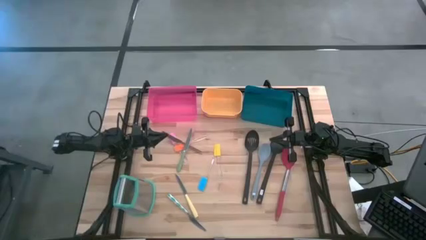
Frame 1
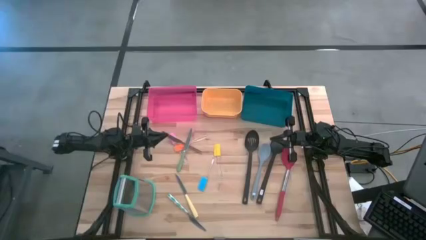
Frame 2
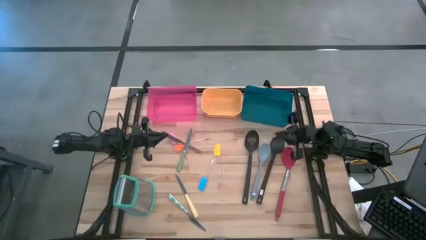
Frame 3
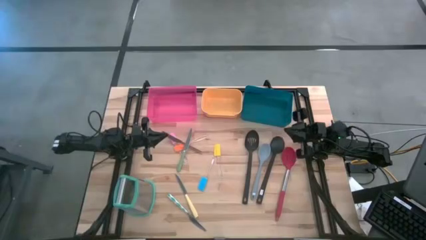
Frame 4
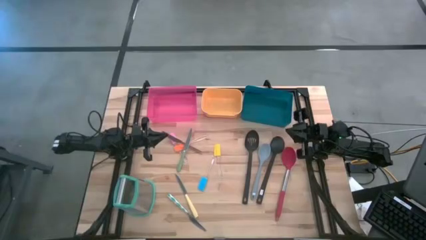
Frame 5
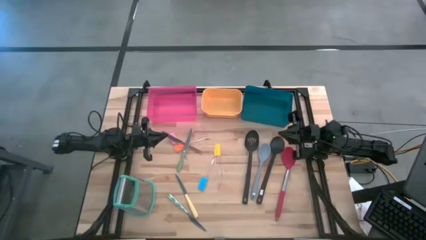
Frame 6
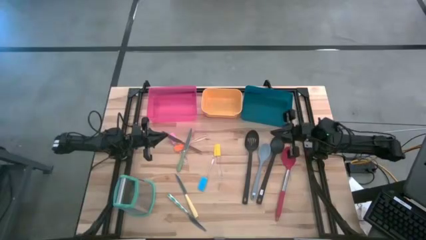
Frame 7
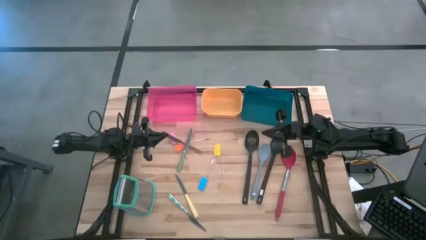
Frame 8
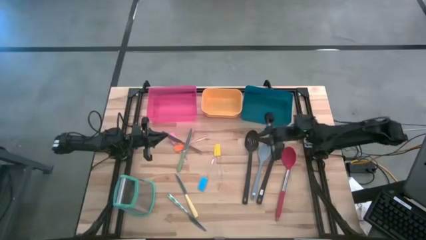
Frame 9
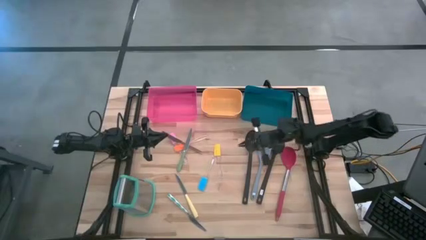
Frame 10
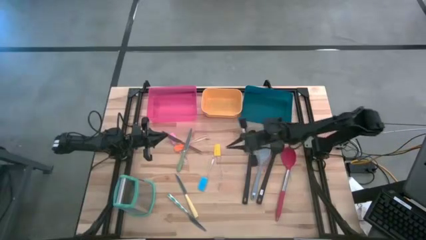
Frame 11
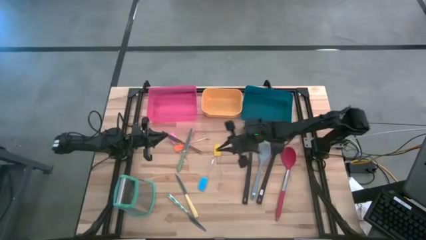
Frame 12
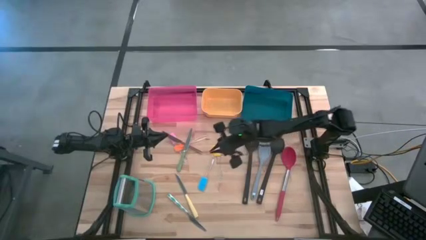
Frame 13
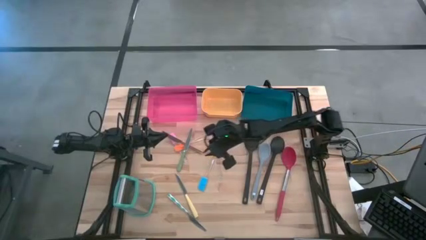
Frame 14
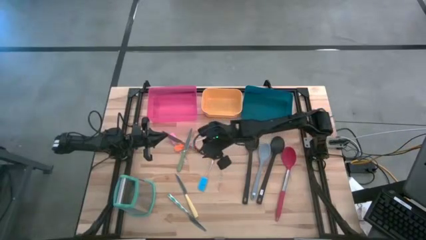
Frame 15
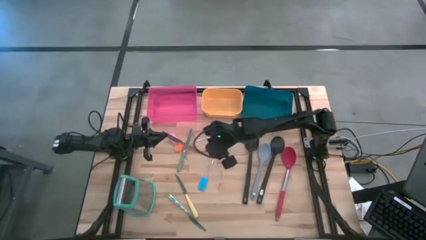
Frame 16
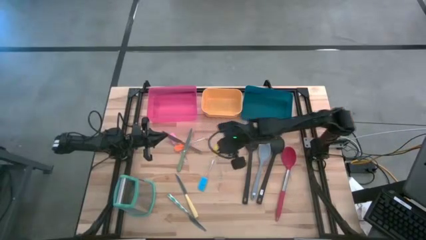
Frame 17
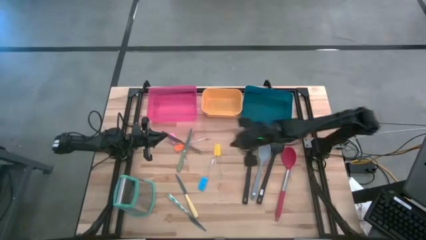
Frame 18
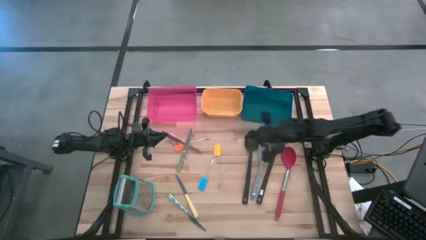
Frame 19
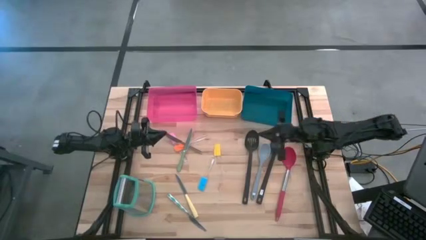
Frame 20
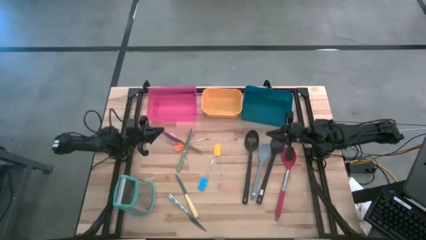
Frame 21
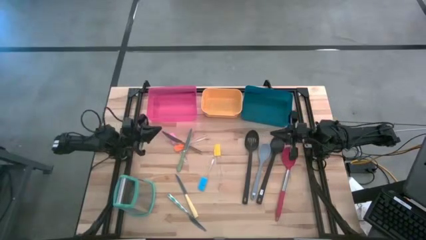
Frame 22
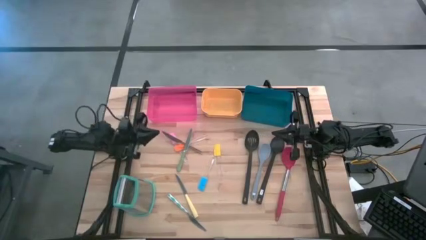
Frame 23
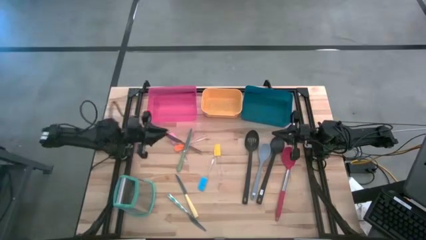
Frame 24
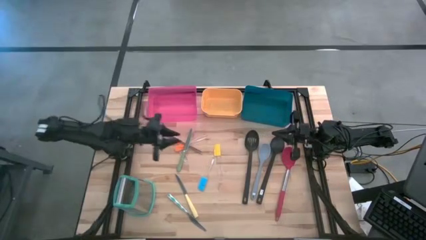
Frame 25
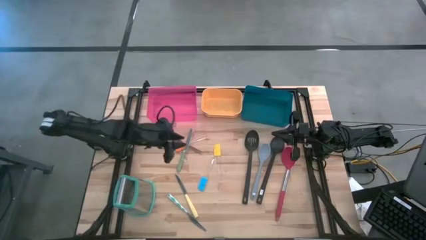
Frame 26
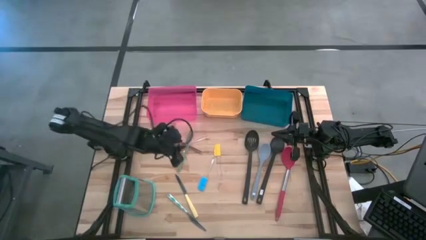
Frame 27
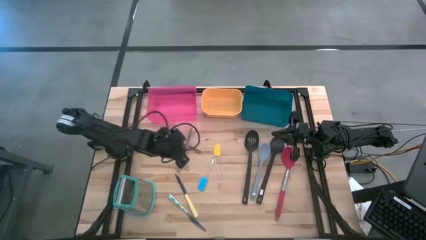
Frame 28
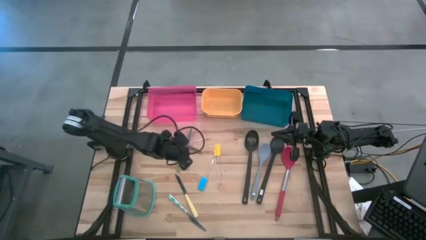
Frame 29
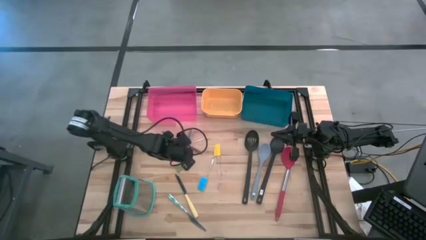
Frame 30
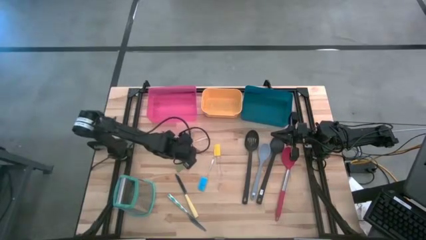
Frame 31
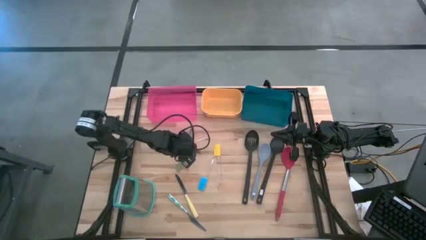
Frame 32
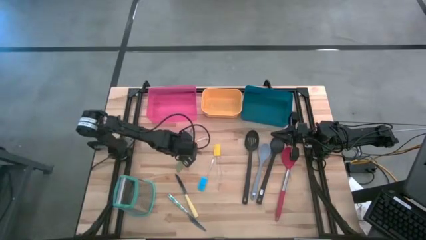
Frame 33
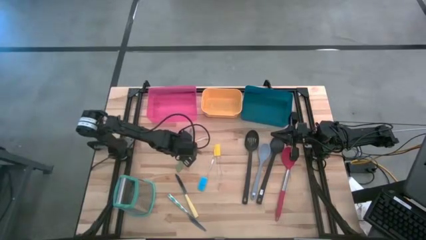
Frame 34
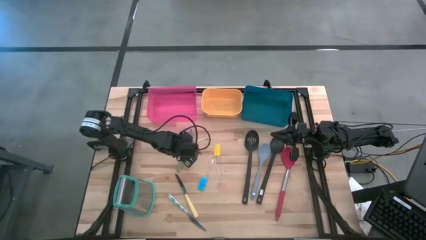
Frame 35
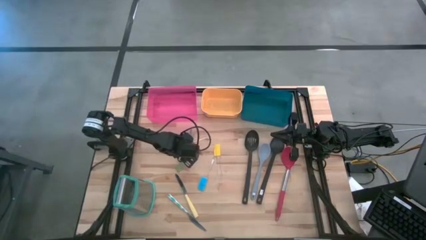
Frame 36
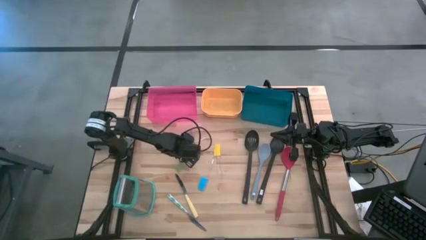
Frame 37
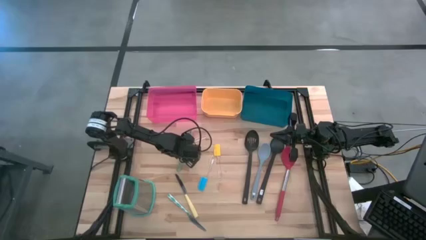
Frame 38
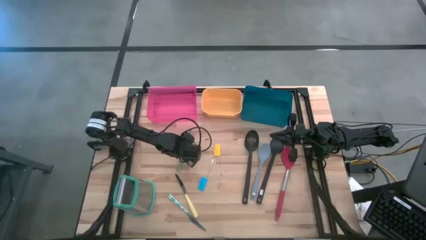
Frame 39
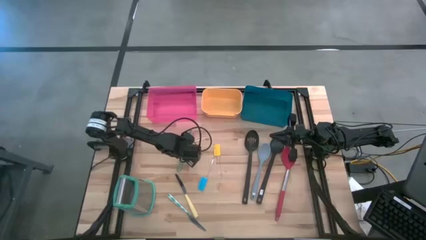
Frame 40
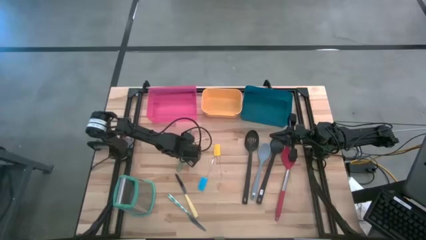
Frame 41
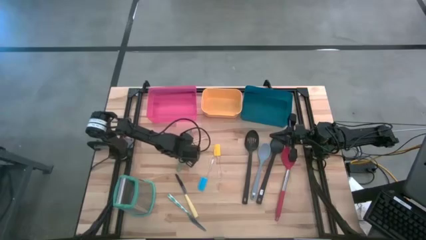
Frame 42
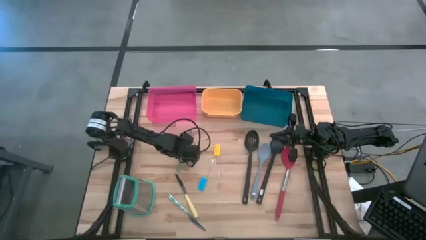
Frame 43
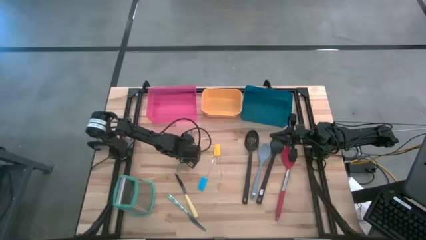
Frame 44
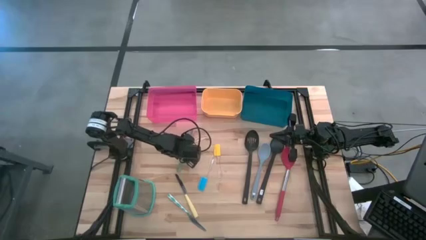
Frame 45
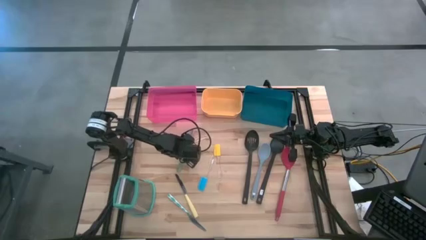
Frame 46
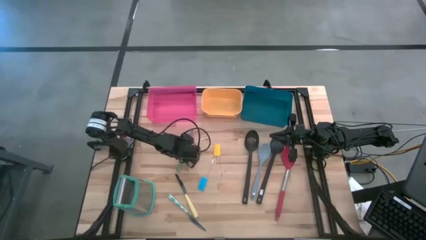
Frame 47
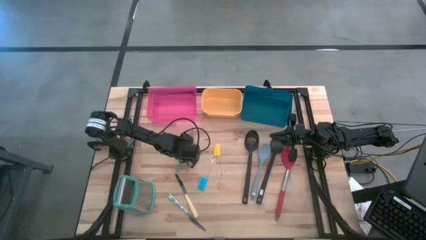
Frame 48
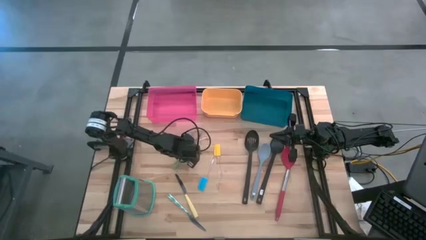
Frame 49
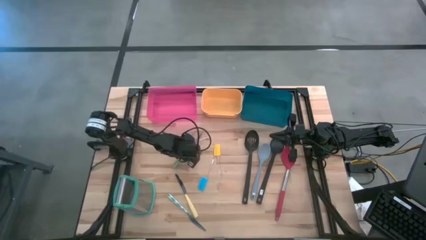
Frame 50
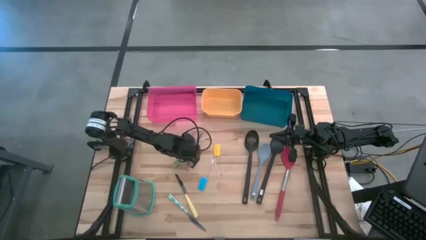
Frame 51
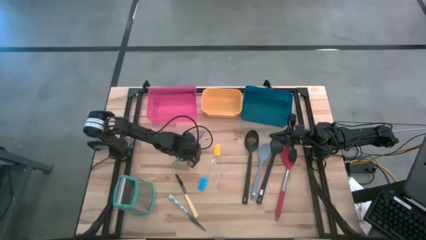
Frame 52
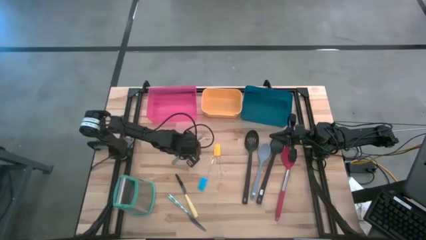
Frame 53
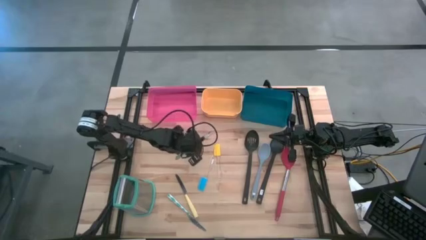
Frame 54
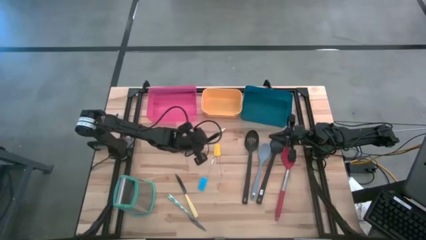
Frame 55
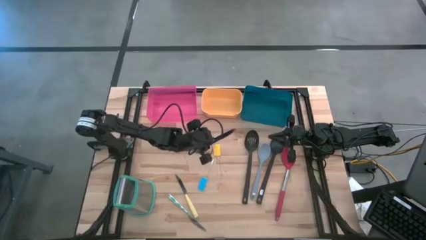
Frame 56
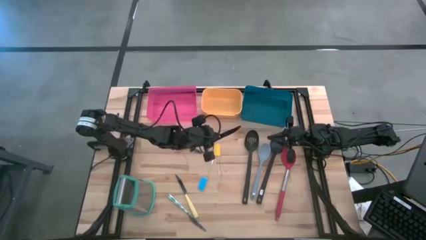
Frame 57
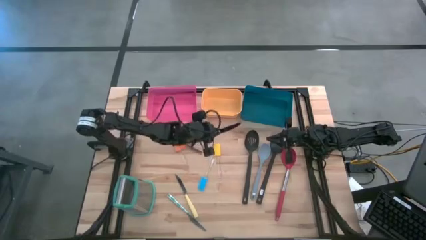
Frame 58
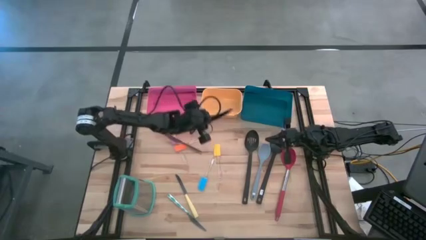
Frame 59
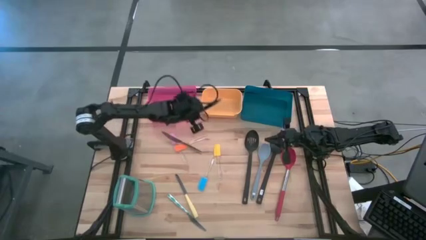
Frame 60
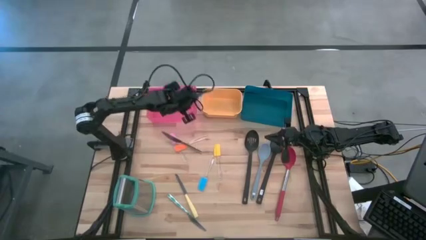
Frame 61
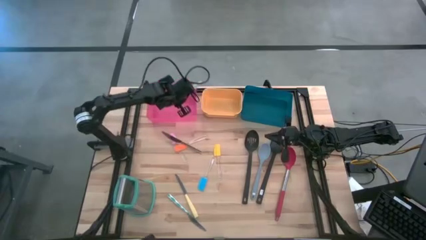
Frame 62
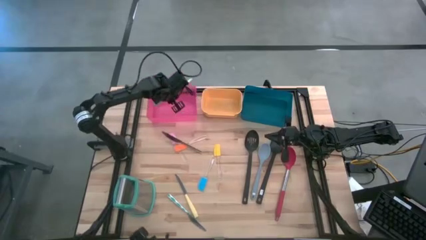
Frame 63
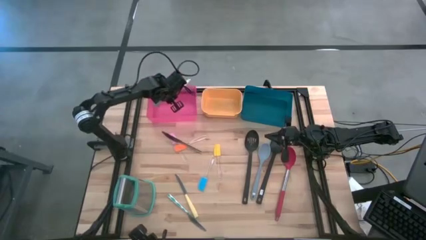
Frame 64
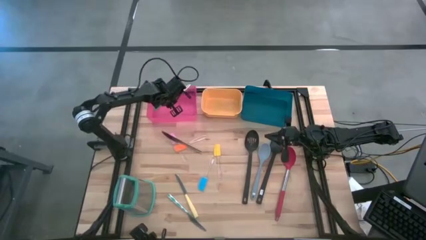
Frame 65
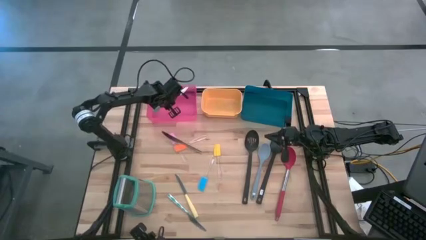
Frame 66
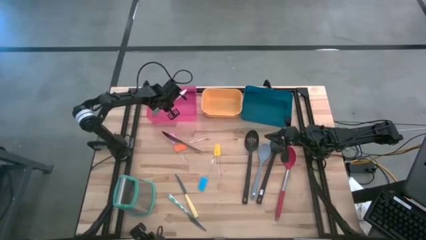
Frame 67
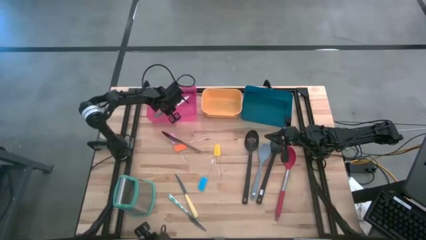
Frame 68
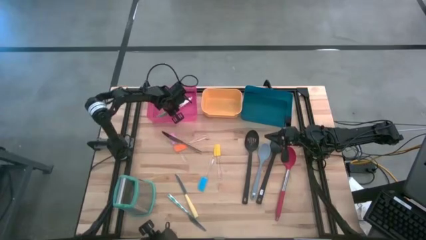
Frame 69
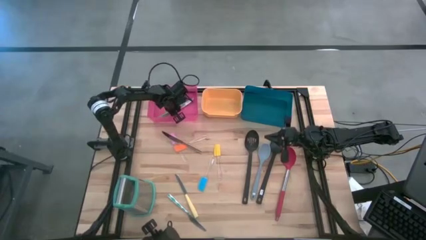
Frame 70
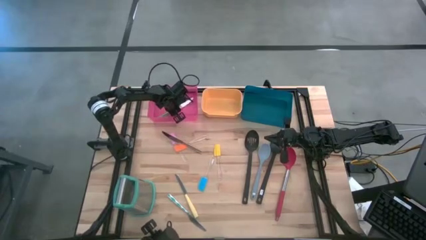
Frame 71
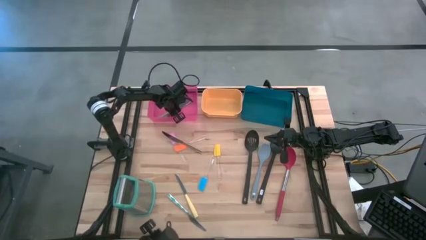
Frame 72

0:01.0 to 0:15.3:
Task: Pick & Place Kitchen Items
Put the green knife into the red bin
